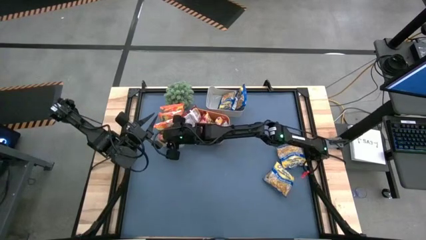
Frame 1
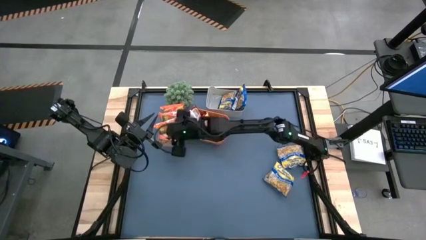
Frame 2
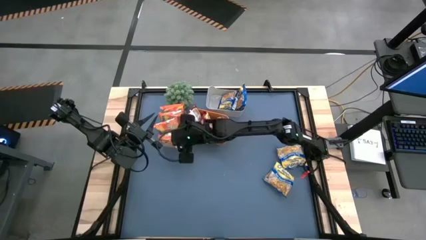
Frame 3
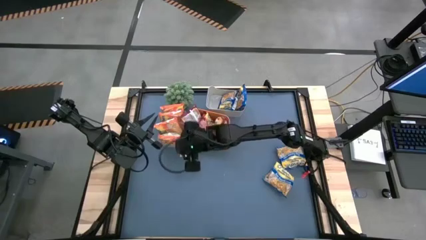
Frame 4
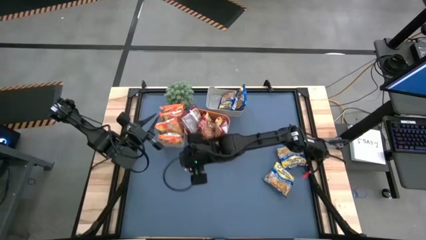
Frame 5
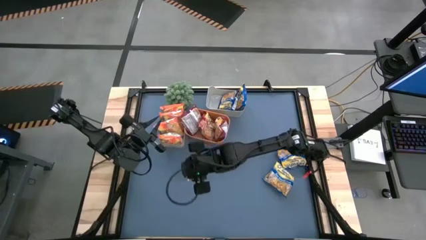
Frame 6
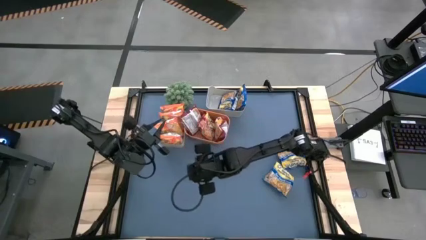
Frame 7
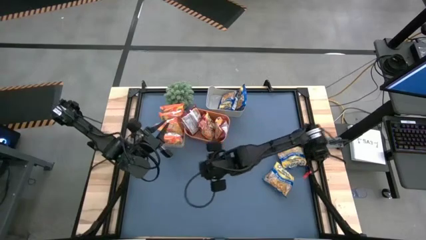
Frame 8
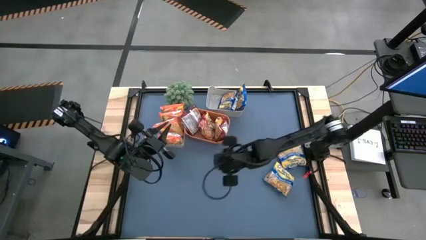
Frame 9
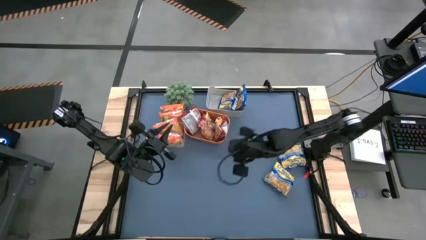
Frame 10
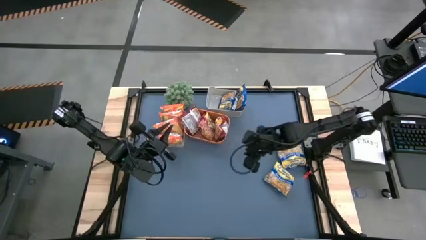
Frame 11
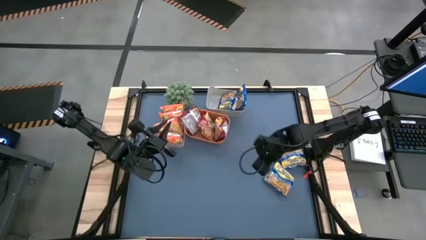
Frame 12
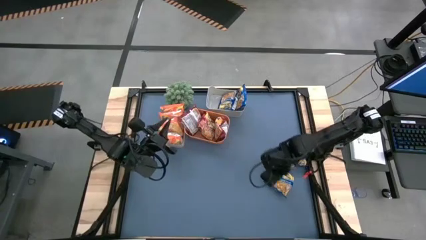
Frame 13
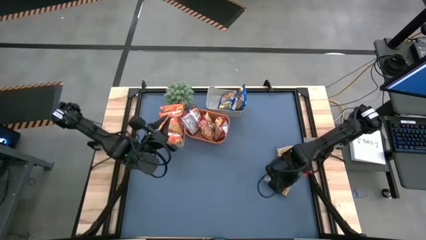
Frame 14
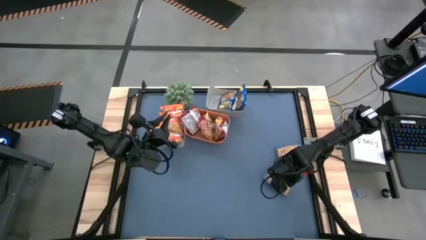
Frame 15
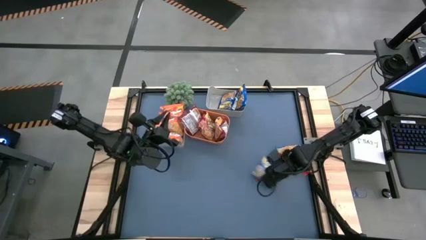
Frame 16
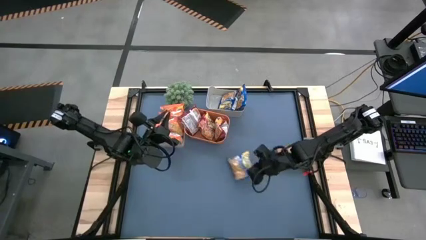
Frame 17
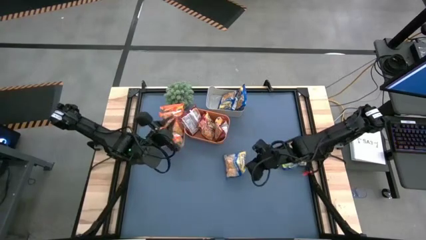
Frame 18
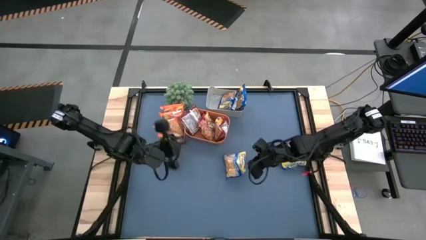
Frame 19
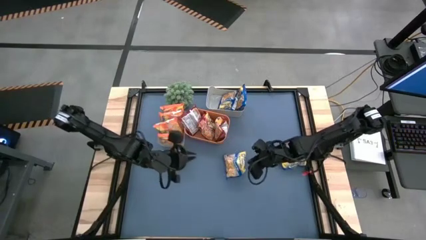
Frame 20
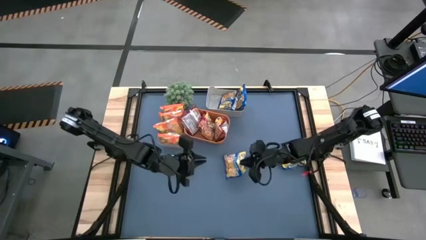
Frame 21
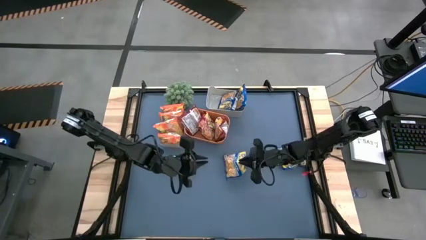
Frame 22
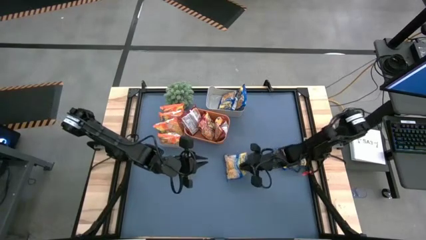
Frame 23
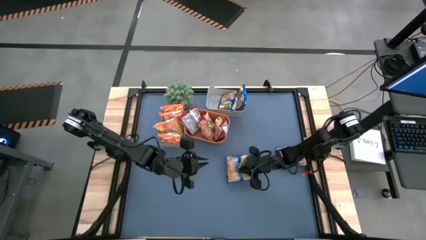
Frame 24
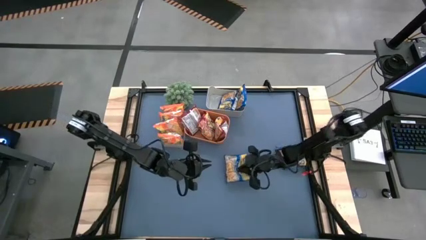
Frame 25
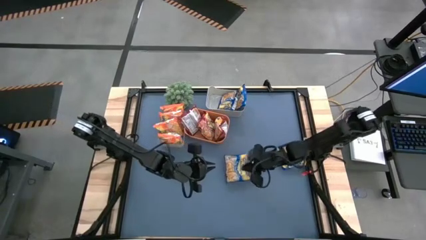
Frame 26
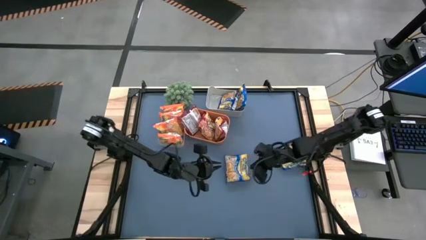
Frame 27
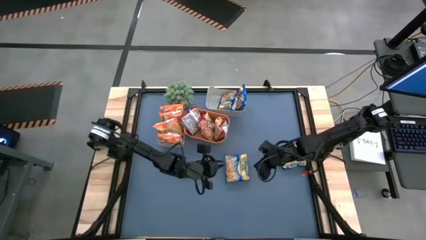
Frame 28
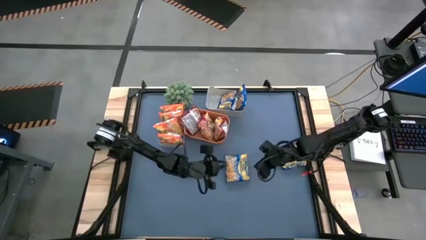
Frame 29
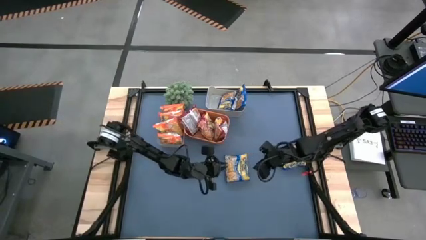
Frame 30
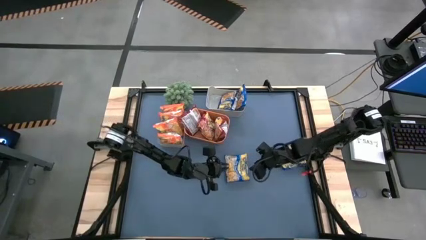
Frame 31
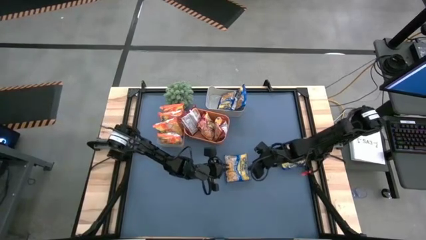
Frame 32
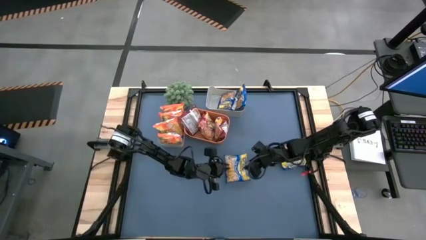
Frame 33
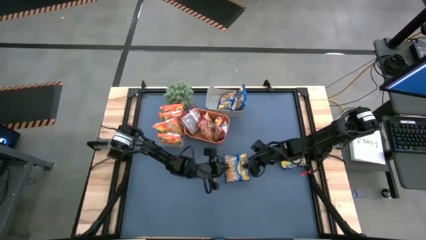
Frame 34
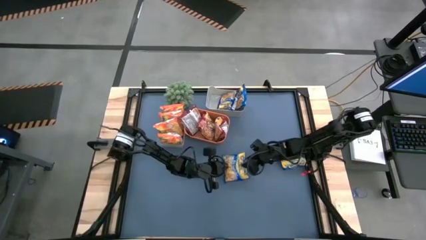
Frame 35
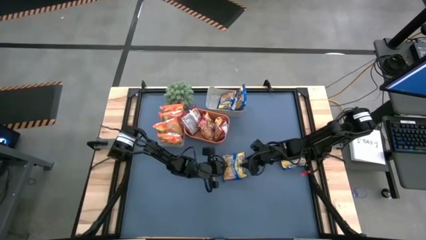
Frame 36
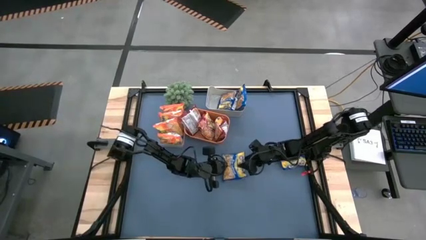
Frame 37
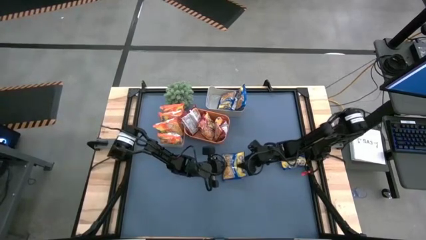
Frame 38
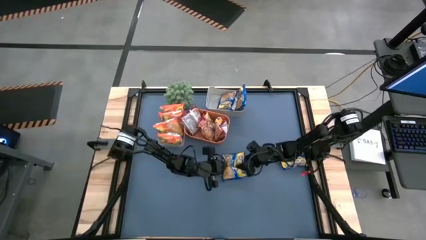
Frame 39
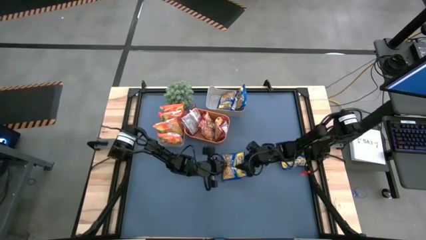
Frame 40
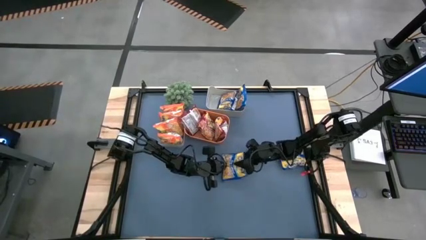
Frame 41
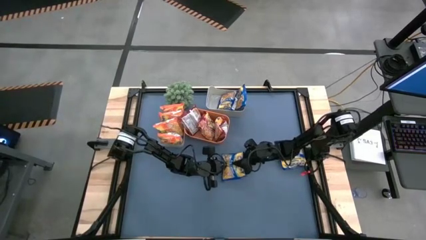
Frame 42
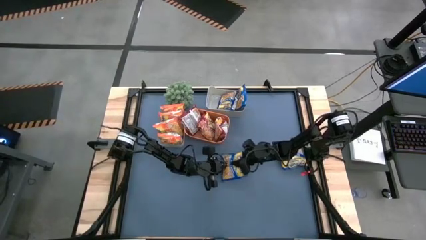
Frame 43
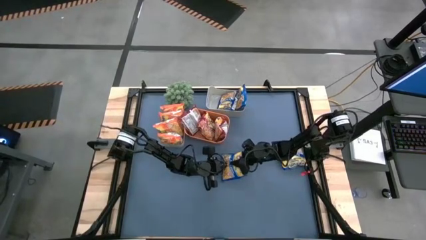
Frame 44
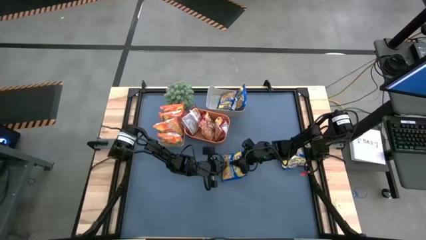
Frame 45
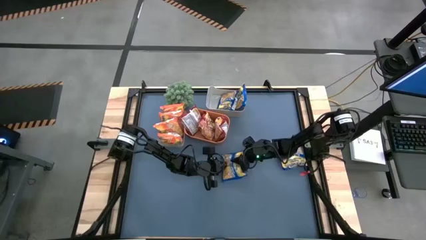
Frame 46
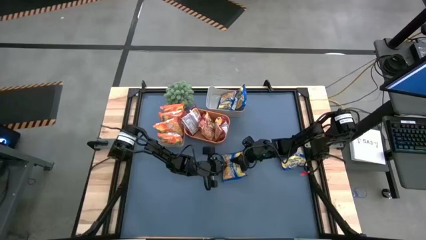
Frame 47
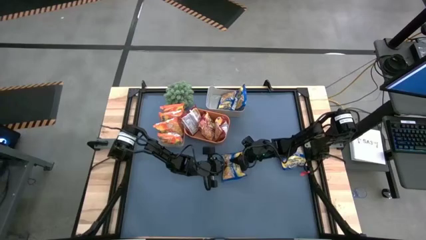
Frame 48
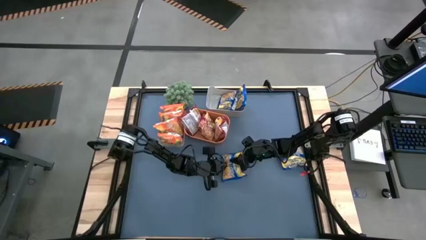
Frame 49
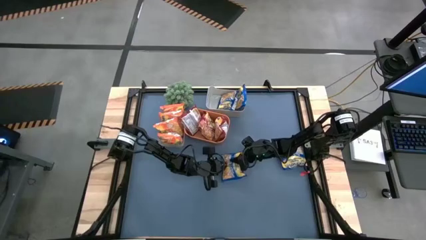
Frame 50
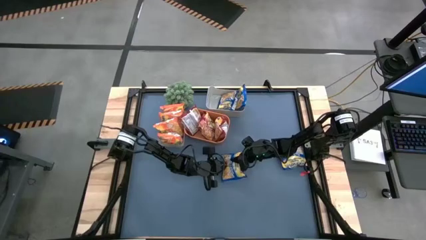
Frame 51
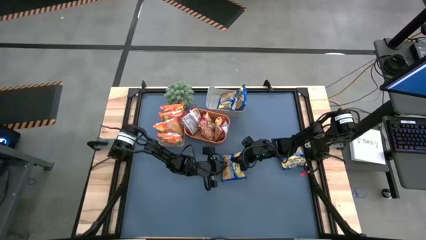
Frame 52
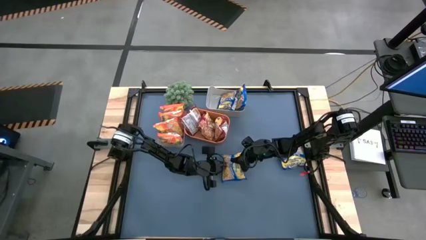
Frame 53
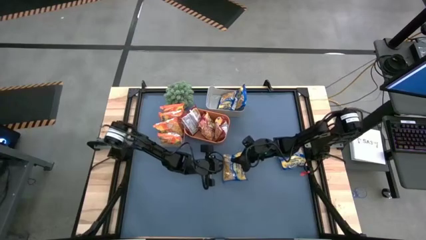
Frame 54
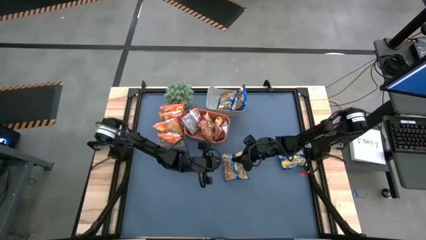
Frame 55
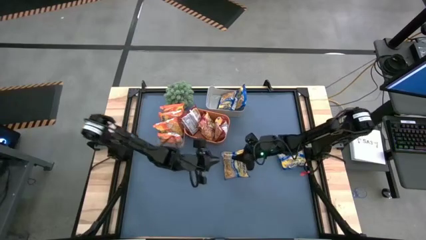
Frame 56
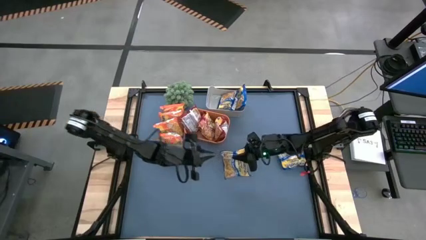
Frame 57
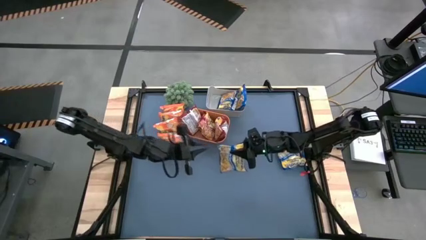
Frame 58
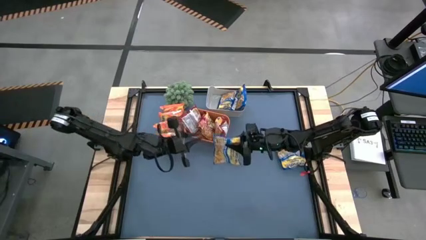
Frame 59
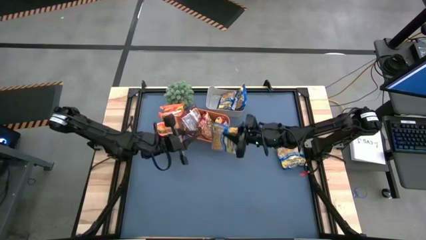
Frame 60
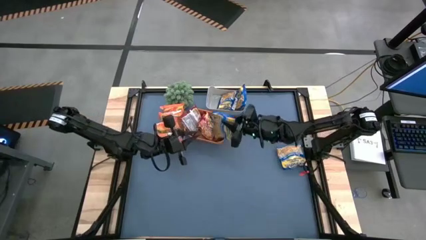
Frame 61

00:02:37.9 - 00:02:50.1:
Task: Sort Maruchan noodles
Put the blue noodle pack into the gray bin

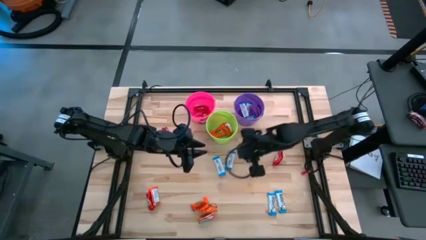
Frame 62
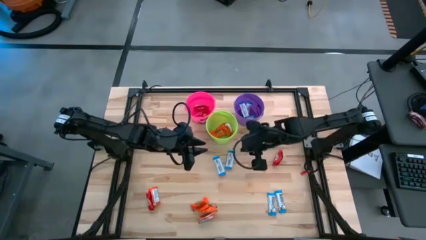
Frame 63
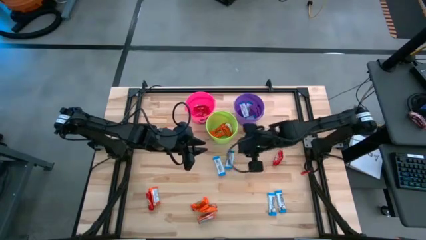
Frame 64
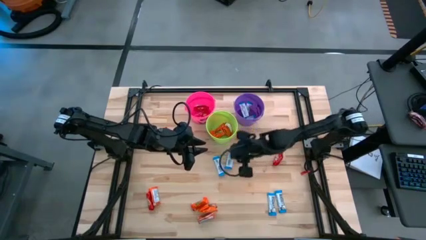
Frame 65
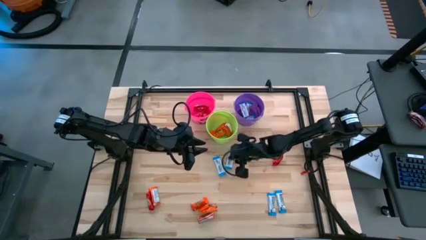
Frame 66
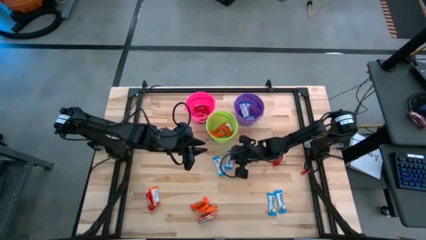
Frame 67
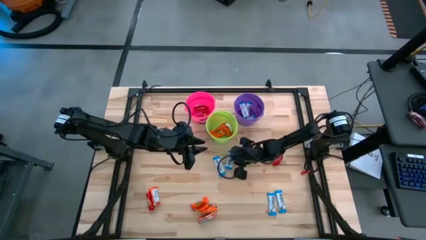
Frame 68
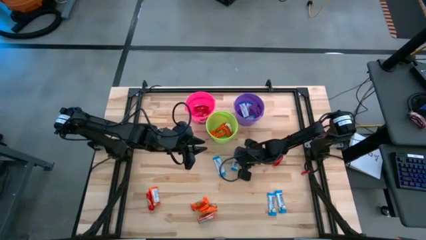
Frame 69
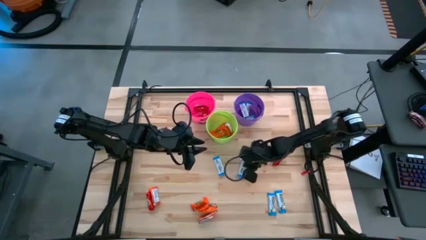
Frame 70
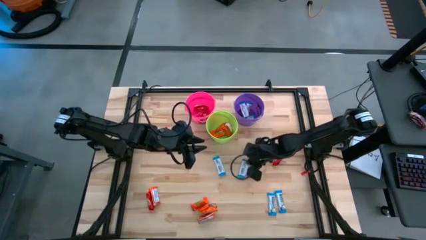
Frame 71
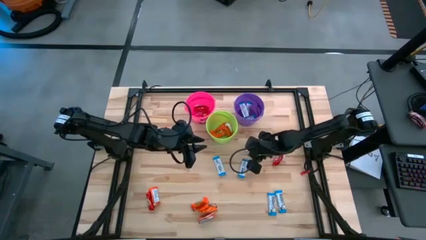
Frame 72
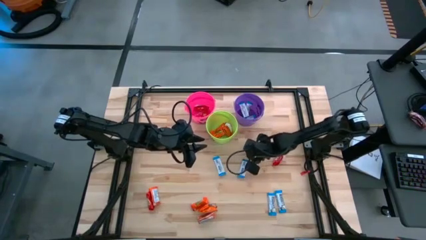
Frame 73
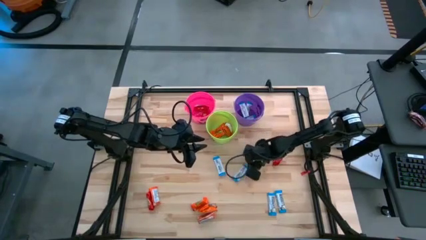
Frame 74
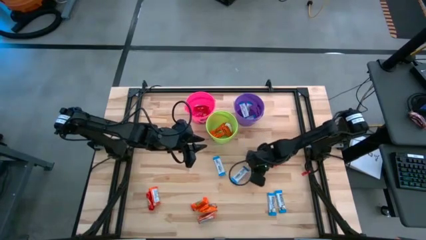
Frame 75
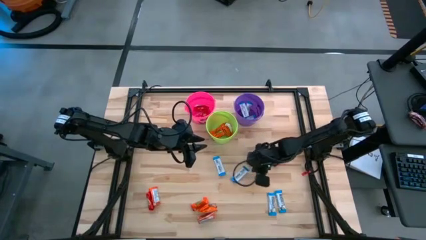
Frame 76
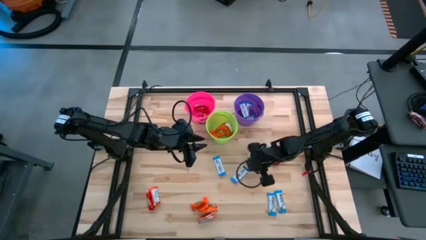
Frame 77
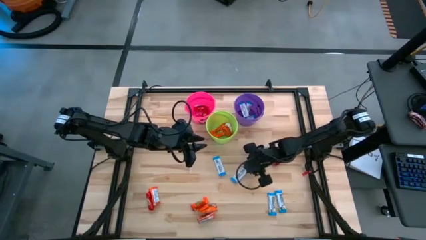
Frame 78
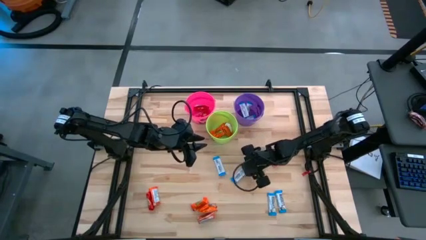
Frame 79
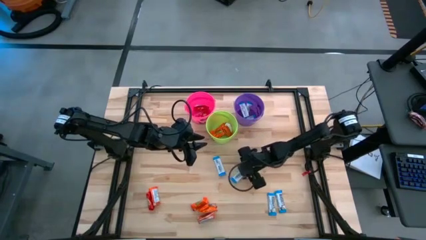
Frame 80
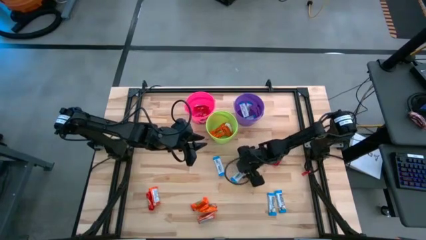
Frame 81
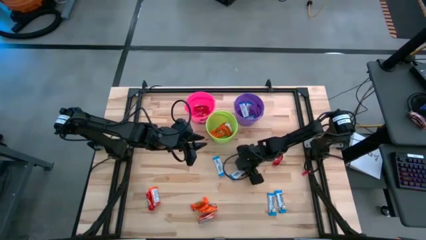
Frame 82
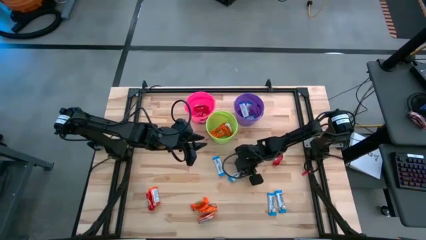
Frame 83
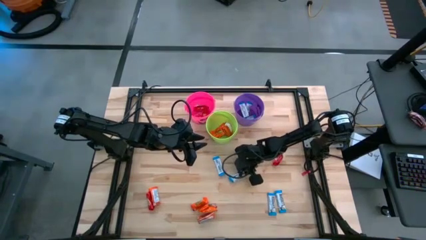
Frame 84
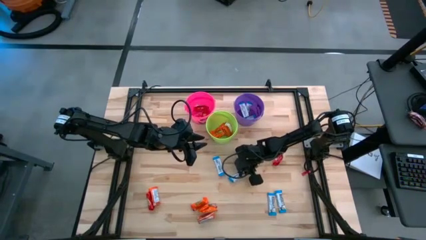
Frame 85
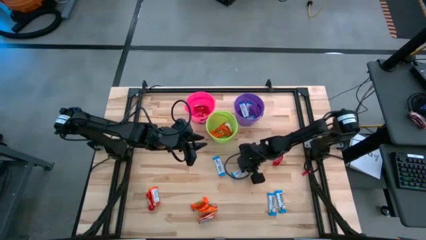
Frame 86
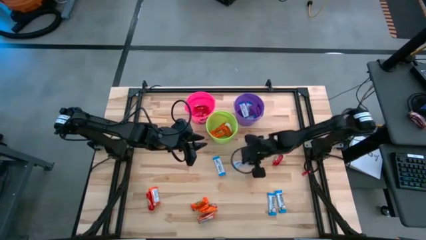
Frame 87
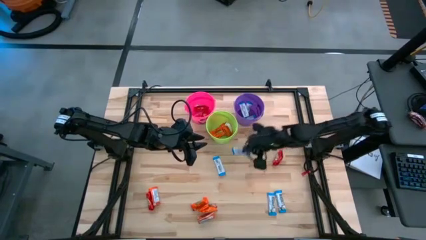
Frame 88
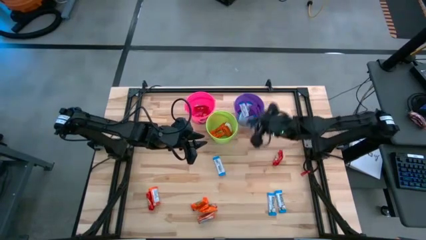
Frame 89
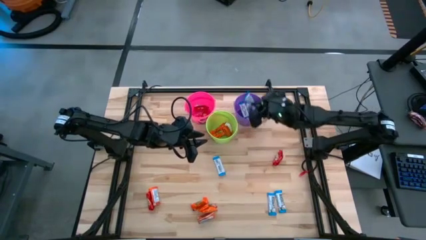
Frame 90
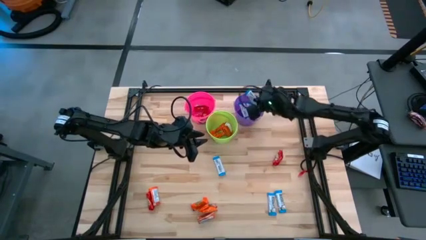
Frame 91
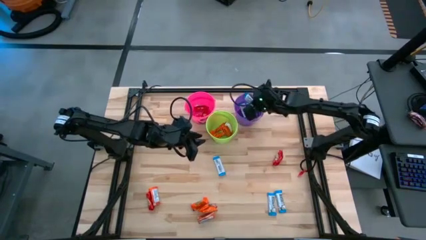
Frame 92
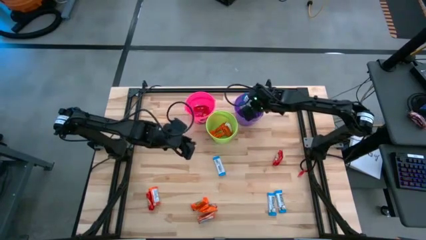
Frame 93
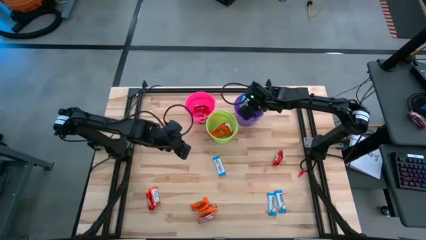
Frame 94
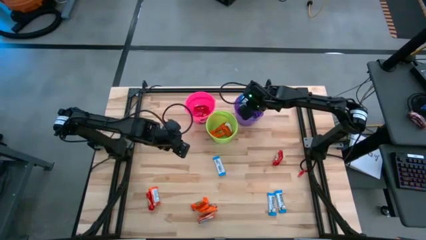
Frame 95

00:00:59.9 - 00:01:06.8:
Task: Sort candy
Put the blue candy into the violet bin
